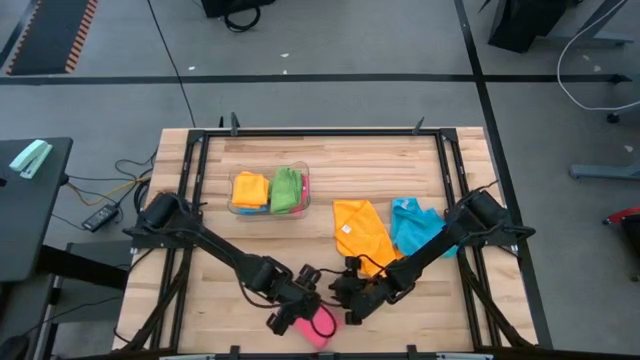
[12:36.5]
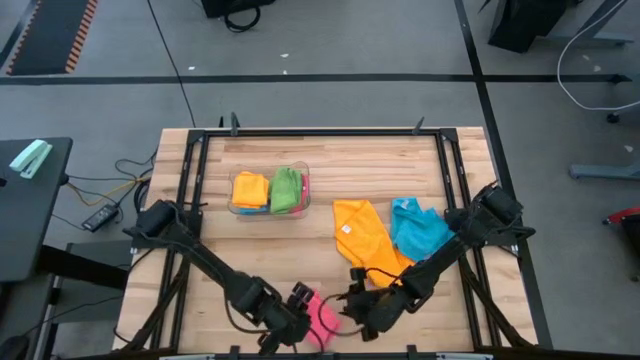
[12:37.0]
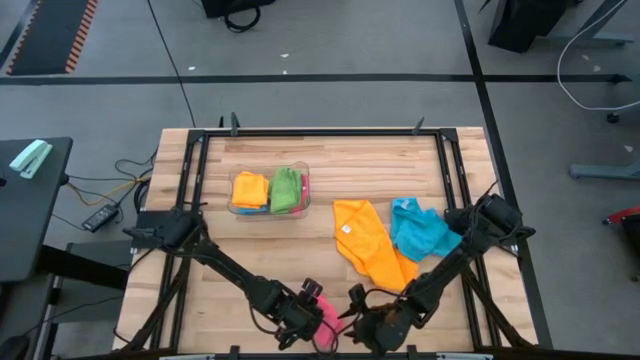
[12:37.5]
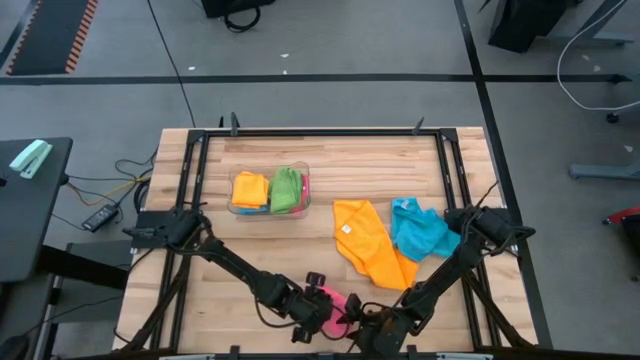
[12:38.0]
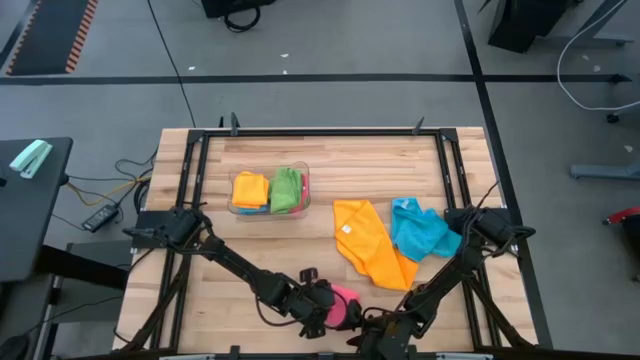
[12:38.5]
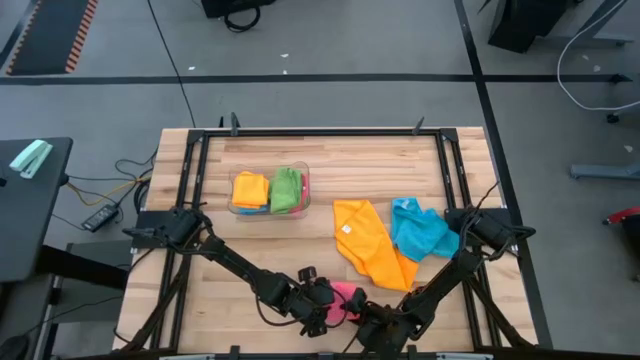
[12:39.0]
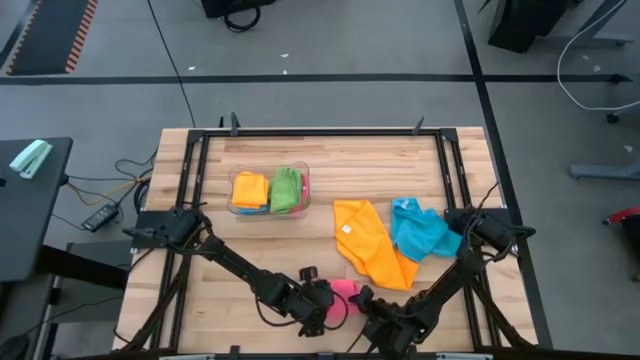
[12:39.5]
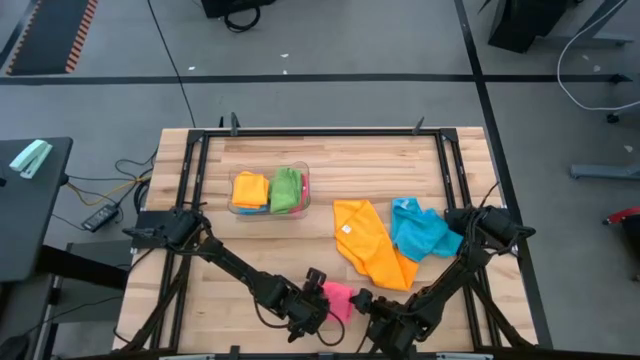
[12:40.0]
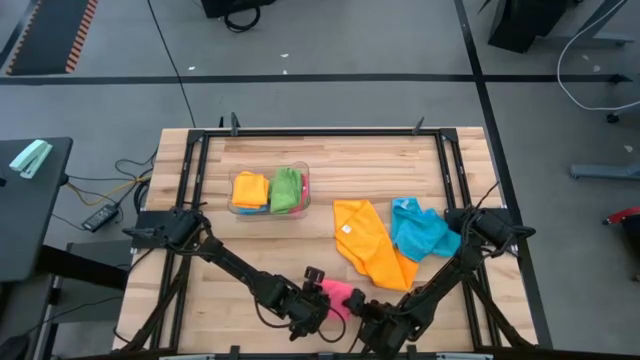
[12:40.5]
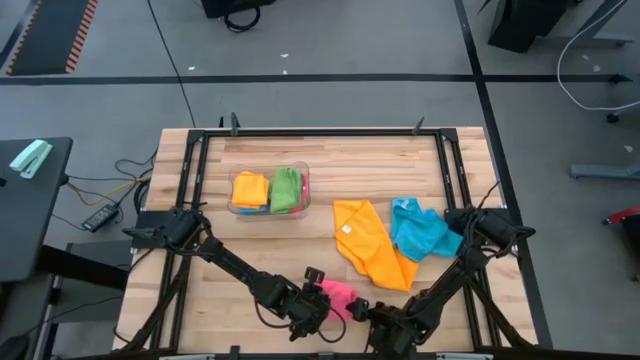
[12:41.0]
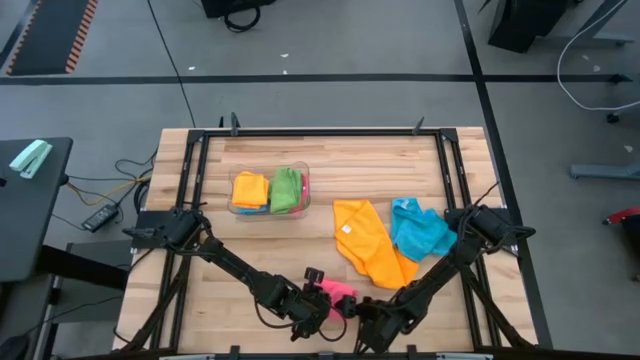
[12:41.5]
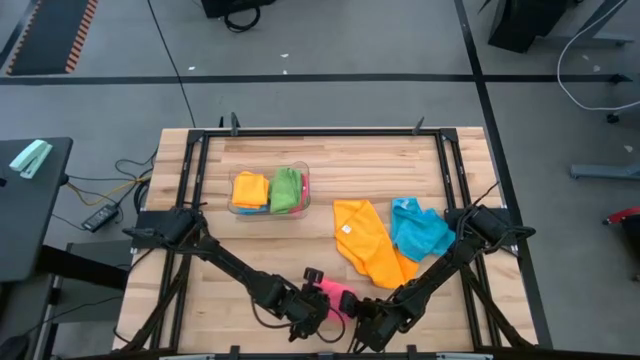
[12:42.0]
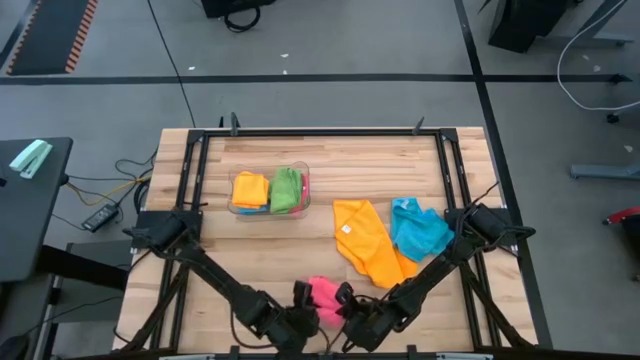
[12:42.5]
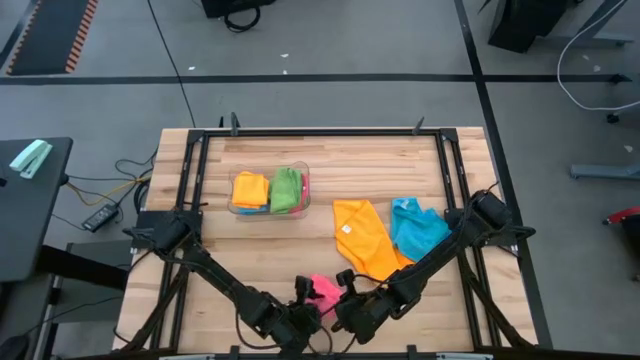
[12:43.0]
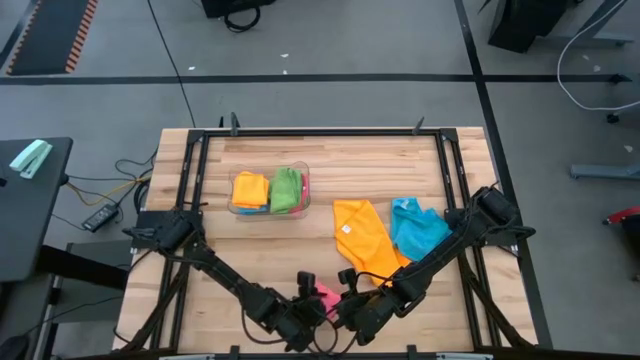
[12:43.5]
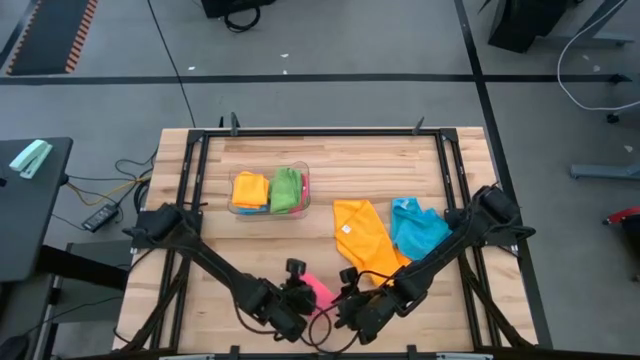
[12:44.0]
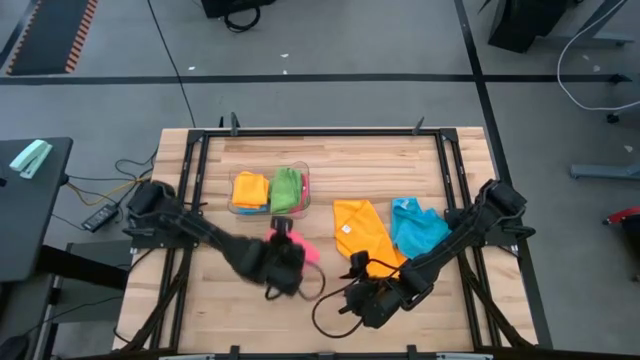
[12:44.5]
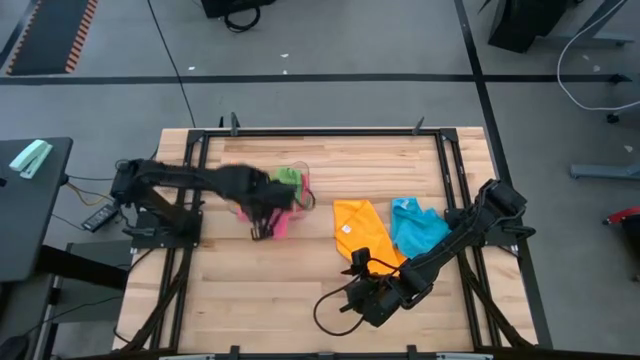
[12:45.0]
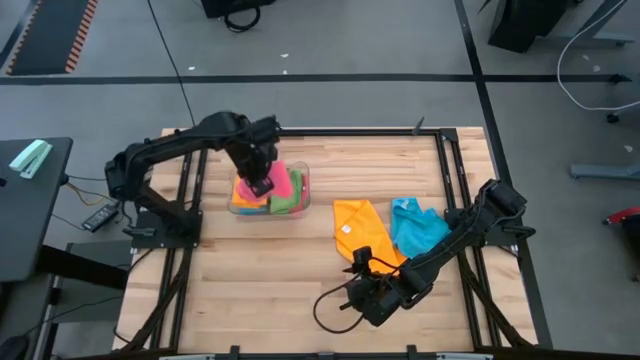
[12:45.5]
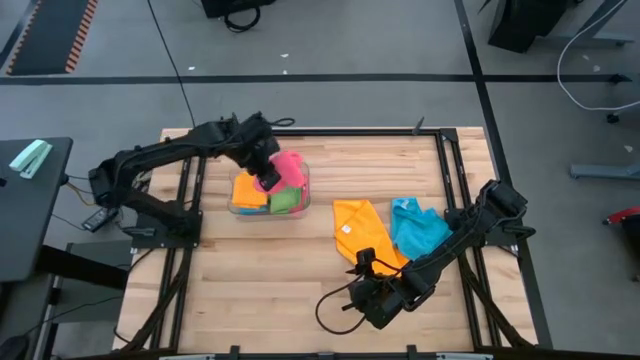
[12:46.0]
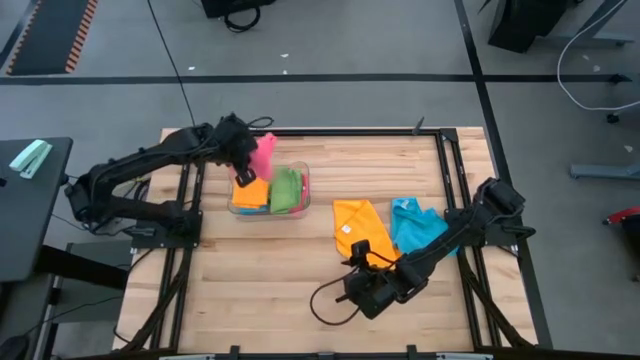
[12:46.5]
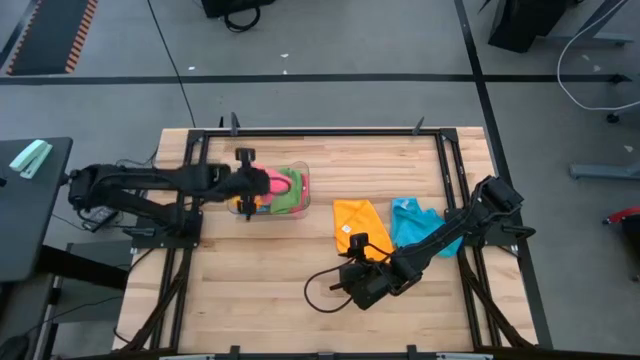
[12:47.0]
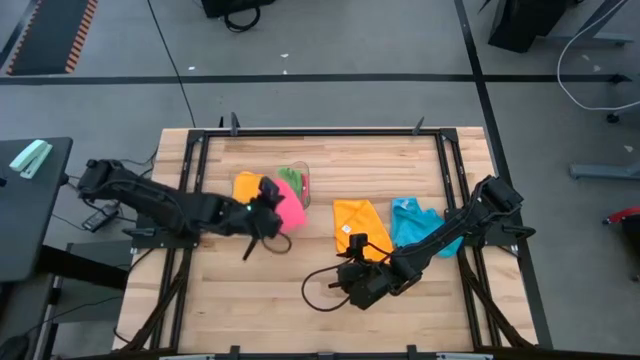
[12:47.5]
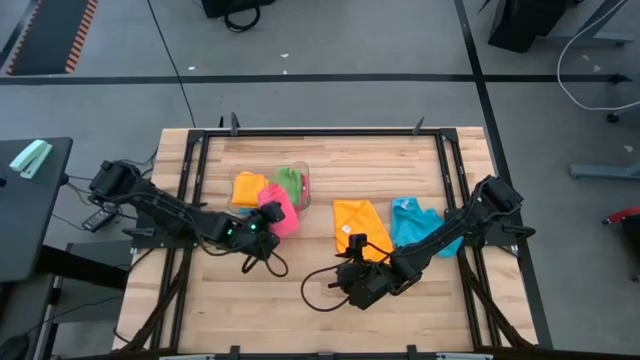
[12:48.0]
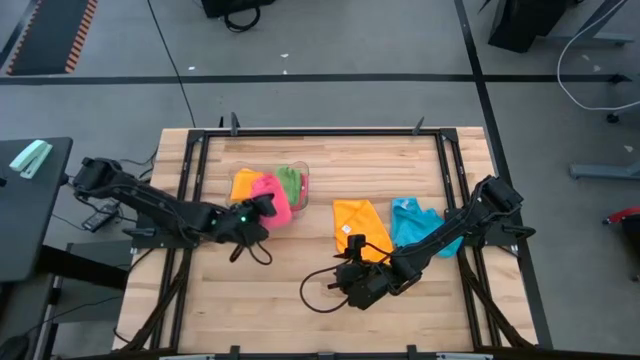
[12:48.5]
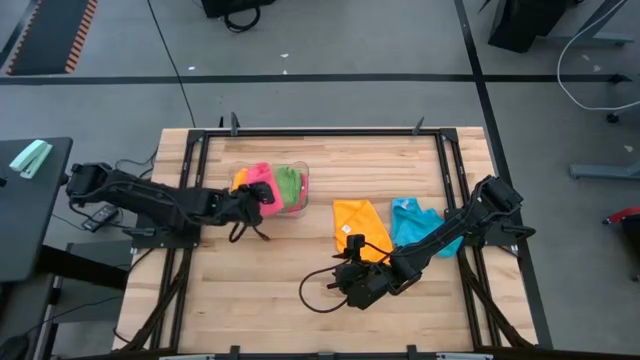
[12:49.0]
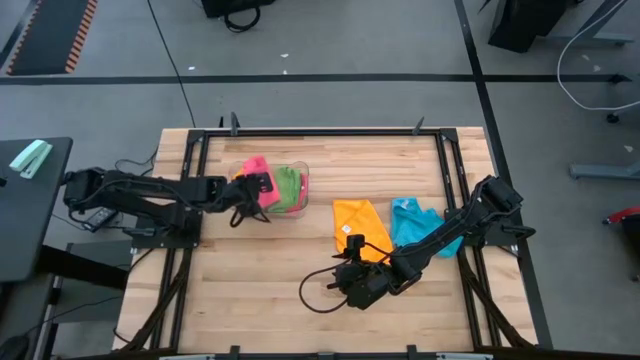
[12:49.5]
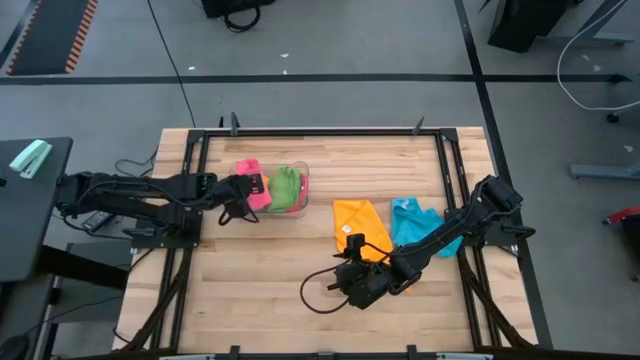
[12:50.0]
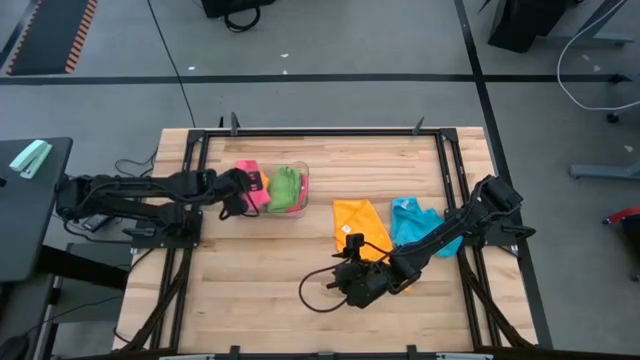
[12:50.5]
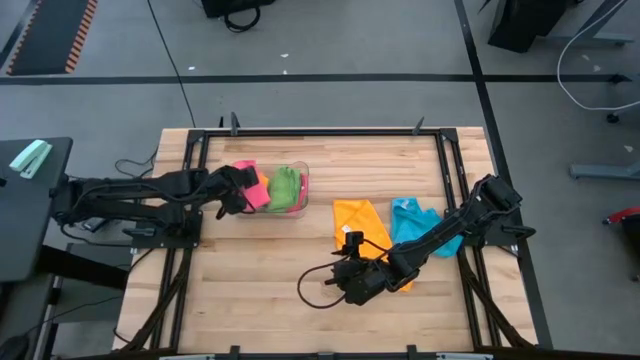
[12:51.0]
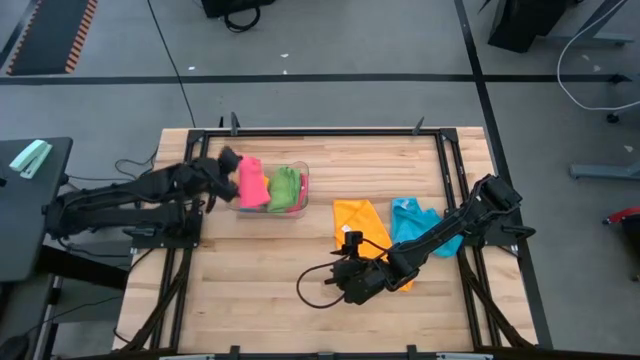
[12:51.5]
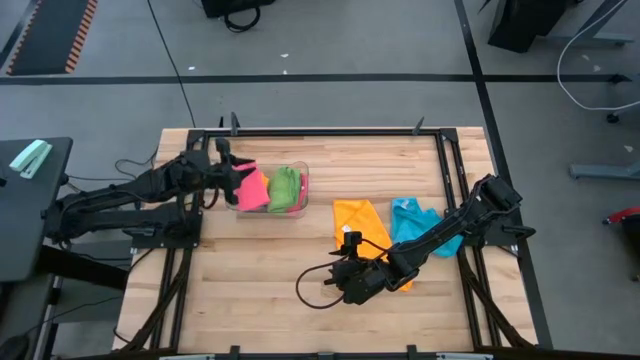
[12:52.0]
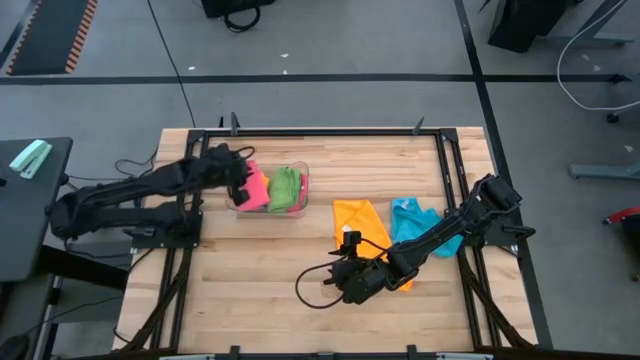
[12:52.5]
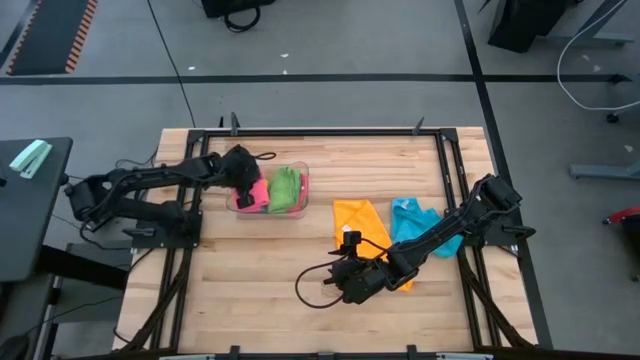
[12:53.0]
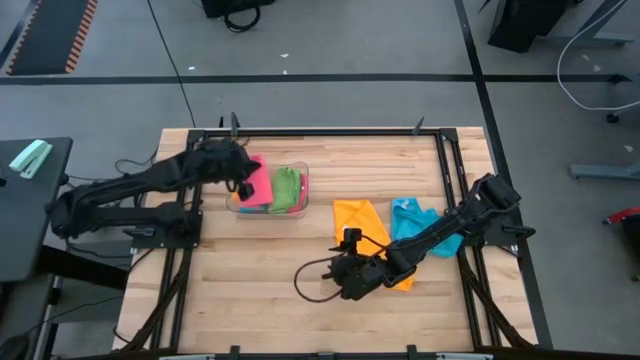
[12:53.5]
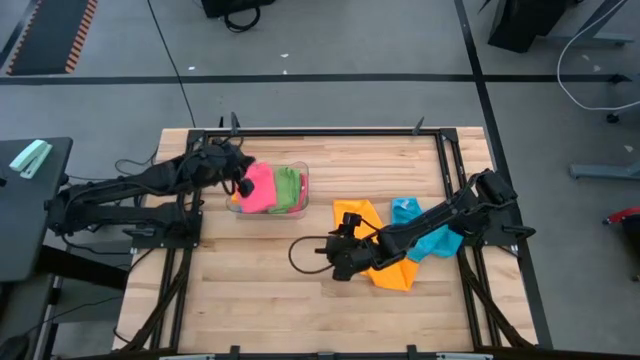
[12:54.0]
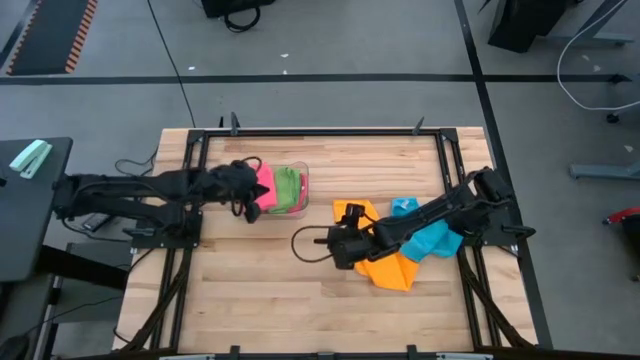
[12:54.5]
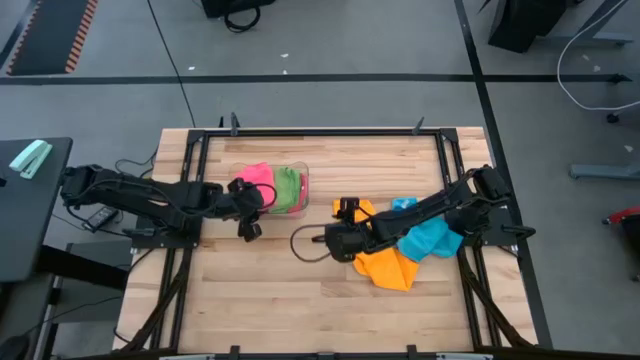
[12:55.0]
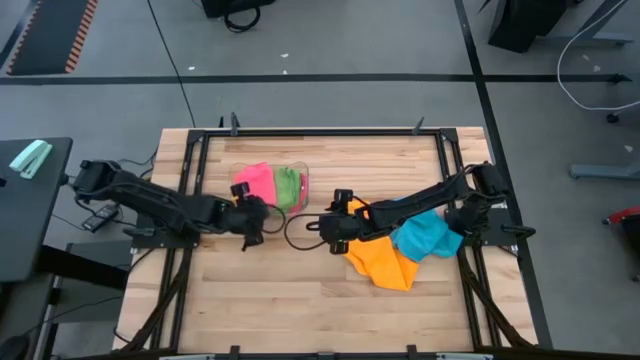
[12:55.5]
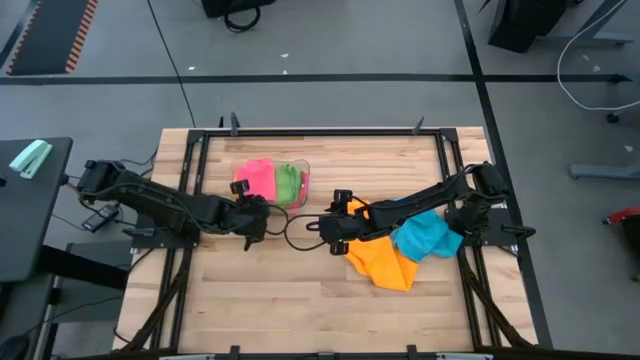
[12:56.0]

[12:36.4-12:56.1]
Task: Fold microfiber towels
Stack the pink microfiber towel on top of the orange microfiber towel
